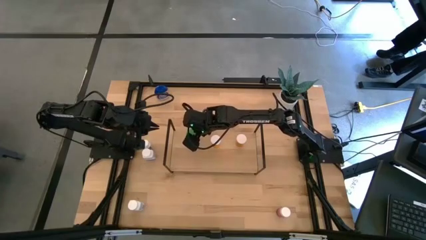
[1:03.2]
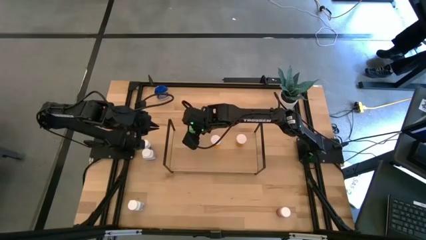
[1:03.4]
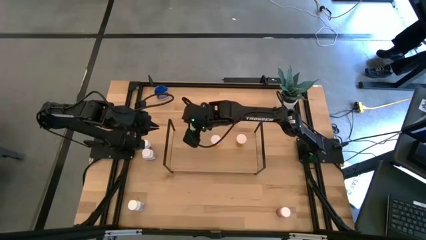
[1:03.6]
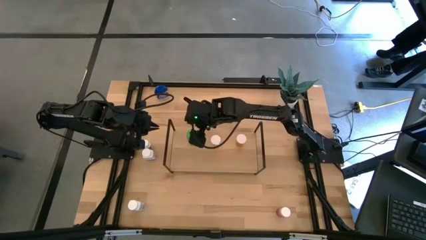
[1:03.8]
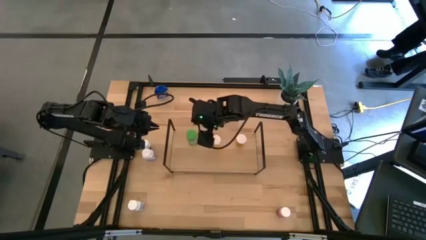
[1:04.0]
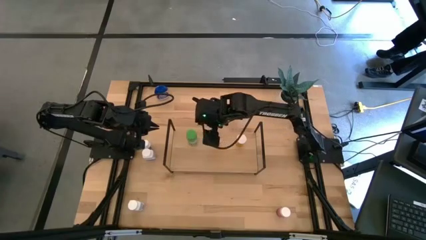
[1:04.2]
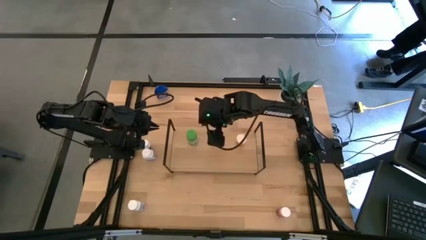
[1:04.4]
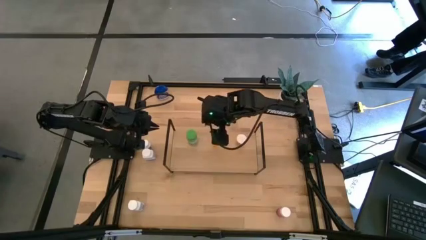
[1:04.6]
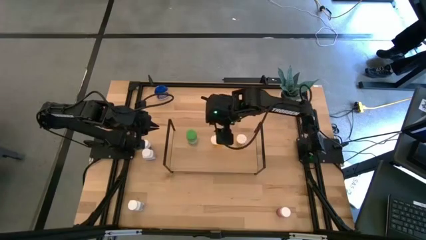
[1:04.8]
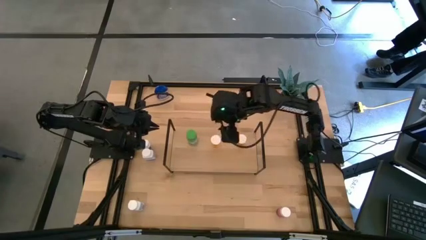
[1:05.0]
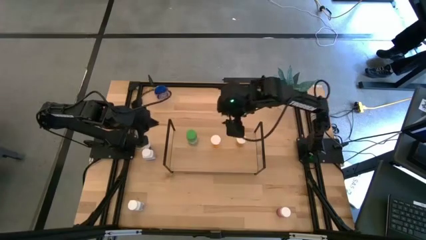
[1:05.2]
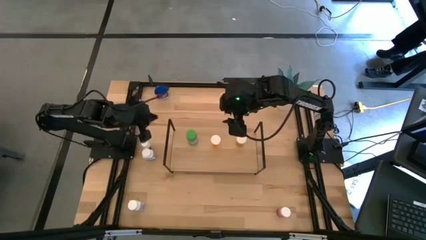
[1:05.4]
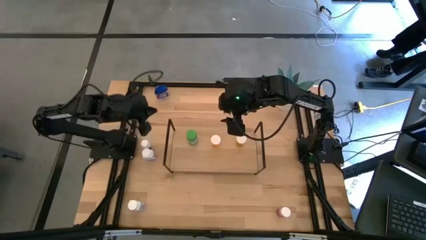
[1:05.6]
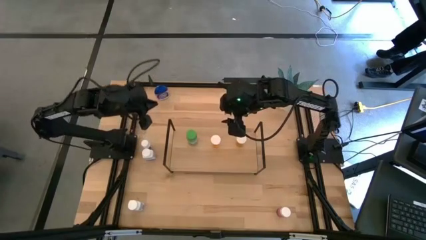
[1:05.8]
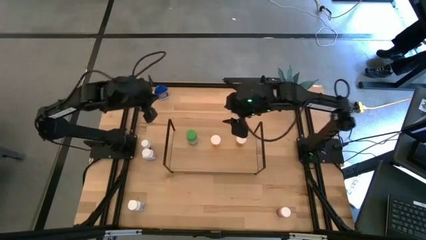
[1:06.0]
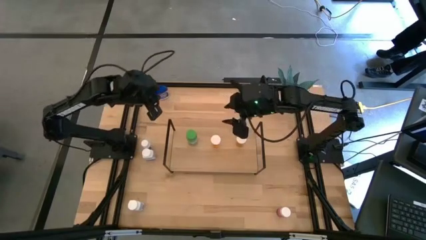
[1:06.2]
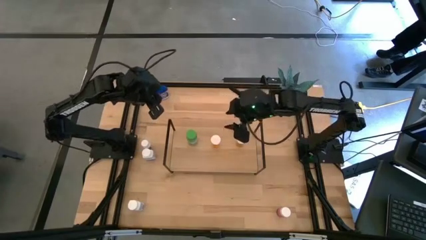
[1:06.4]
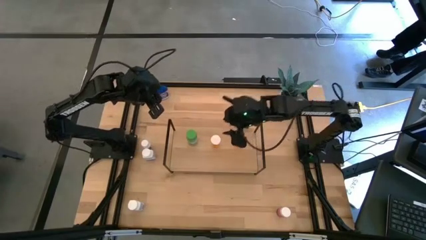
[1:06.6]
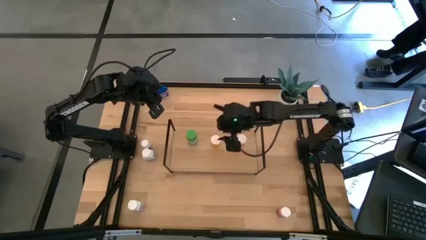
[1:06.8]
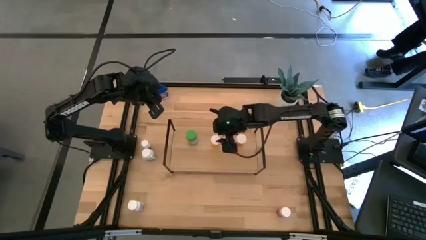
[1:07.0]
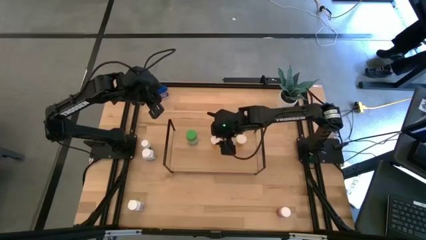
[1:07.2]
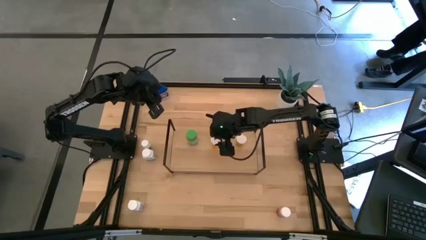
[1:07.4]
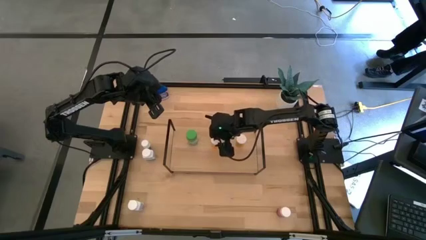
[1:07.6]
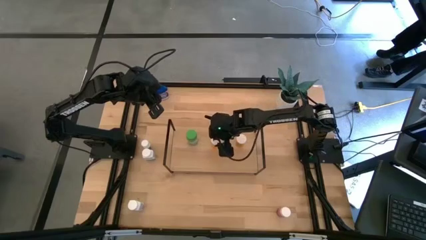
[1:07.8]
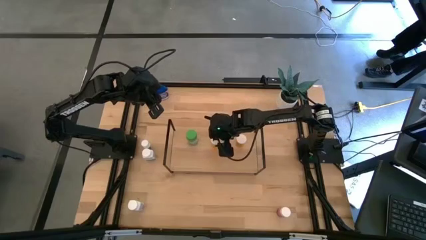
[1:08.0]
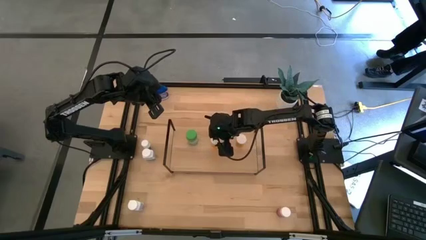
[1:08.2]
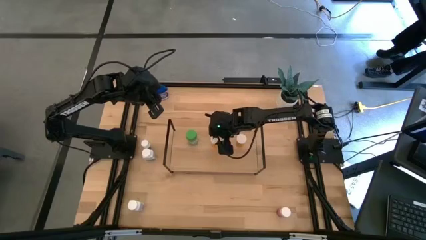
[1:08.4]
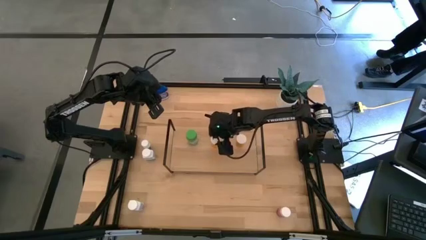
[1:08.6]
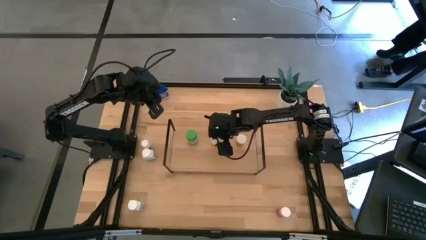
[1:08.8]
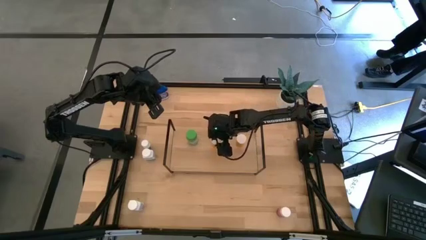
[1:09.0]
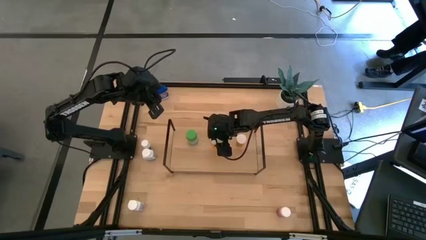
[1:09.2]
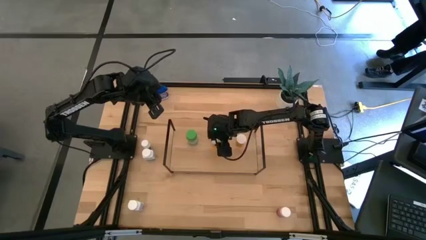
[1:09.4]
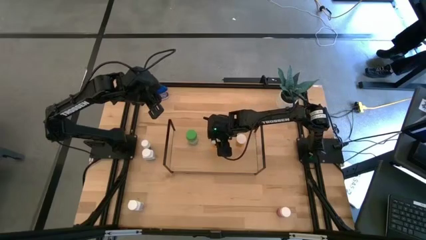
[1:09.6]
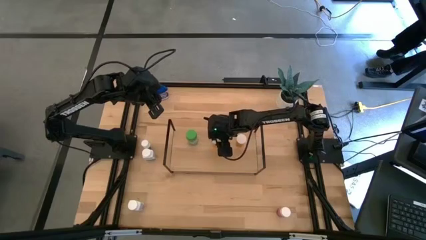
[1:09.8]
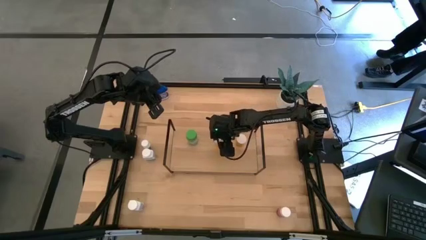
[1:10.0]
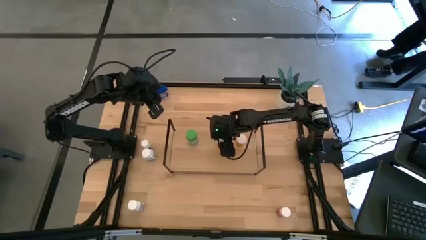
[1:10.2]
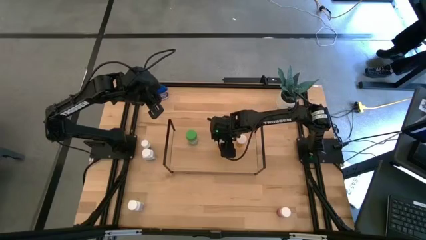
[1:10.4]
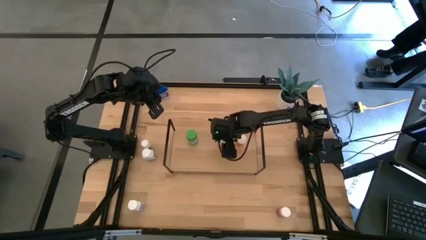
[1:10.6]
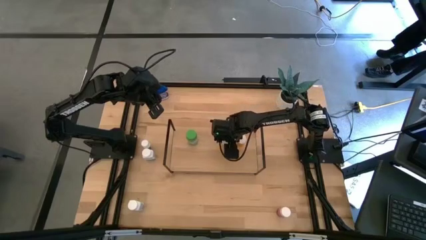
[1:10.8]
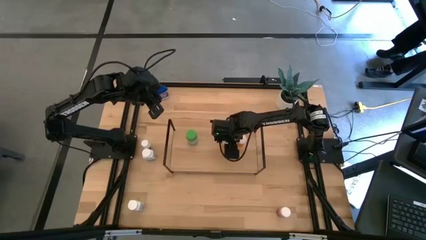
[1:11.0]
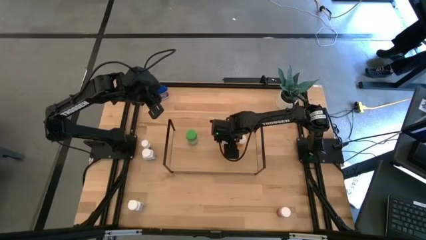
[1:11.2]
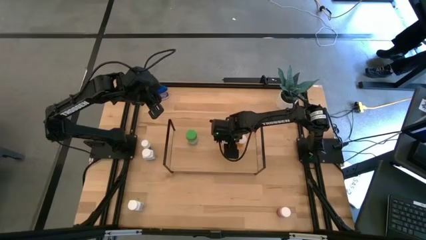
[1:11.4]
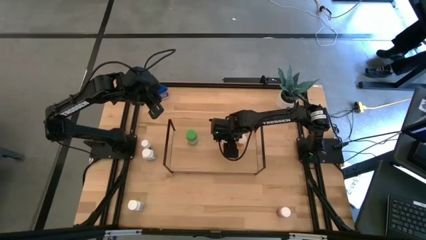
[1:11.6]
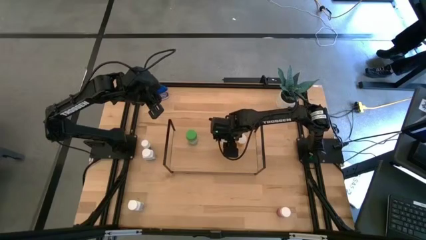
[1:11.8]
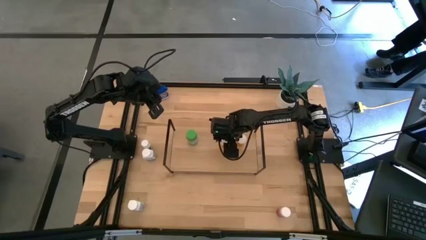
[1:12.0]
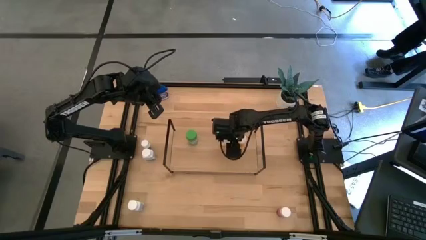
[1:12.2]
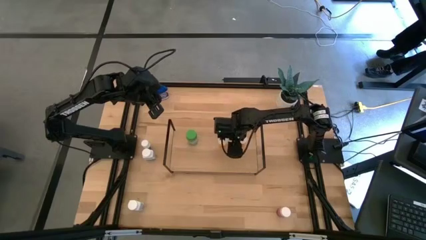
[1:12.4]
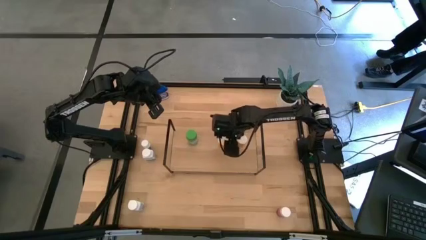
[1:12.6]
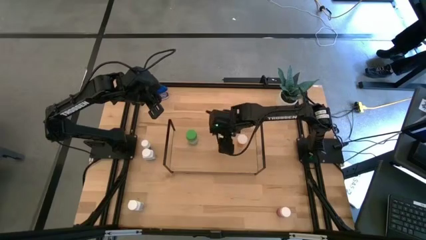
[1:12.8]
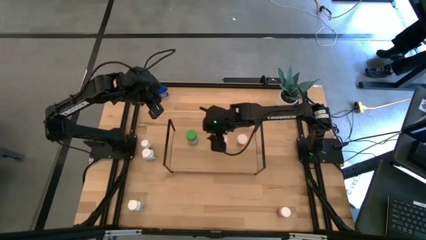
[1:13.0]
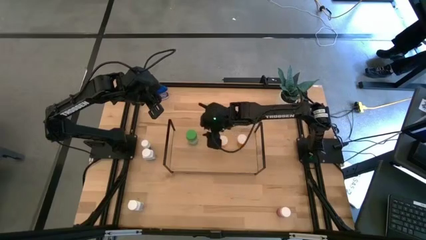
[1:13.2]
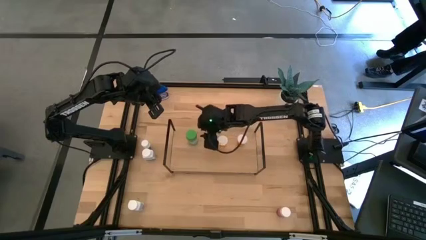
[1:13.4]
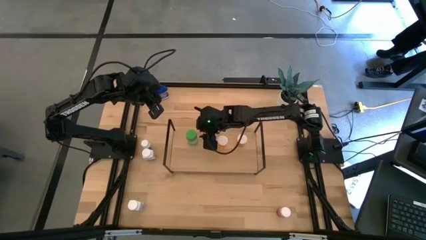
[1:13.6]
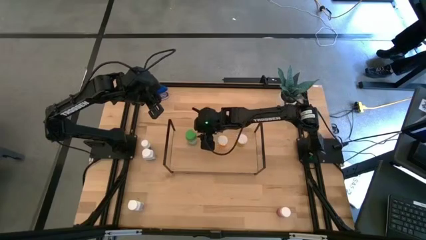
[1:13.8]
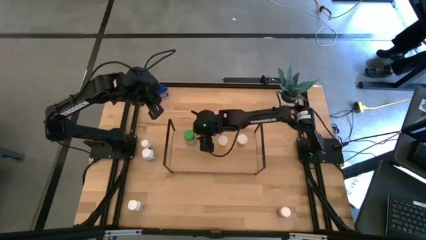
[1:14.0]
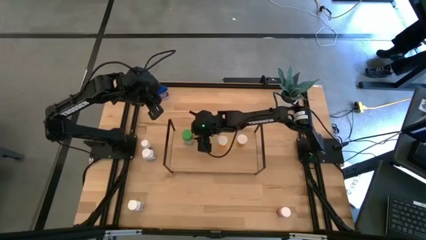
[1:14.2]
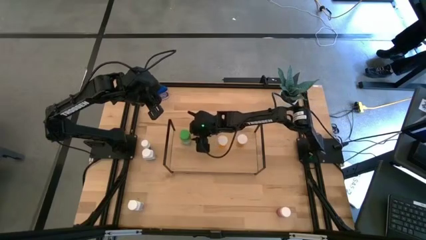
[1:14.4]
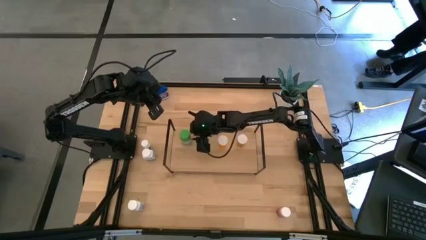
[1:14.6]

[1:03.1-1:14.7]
Task: Pick and place medicine bottles onto shelf by color
Adjust the pill bottles on the shelf
